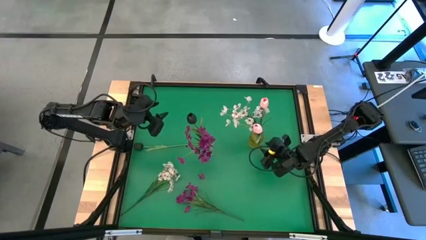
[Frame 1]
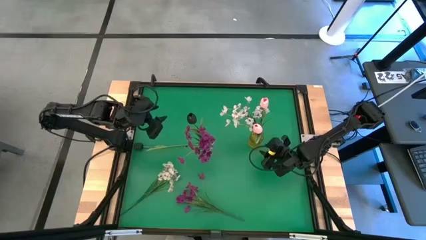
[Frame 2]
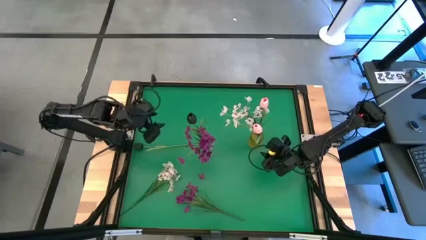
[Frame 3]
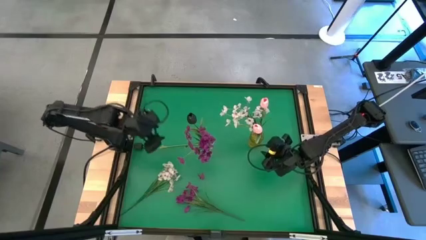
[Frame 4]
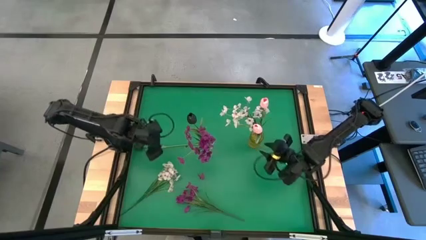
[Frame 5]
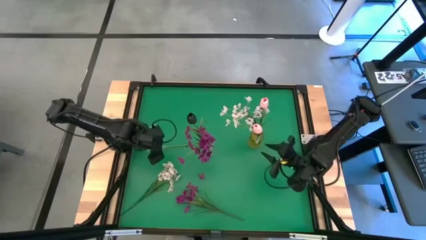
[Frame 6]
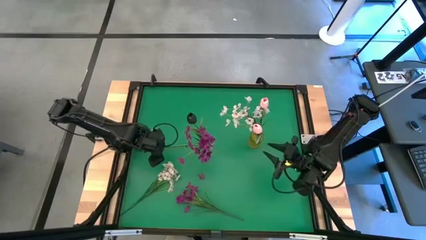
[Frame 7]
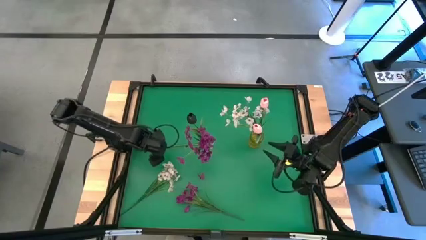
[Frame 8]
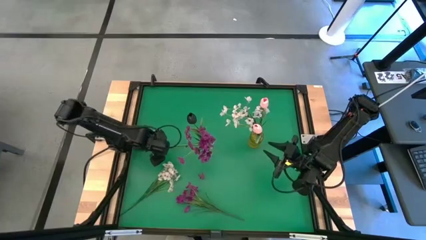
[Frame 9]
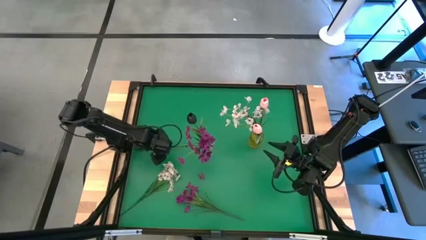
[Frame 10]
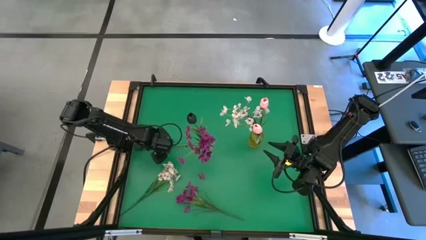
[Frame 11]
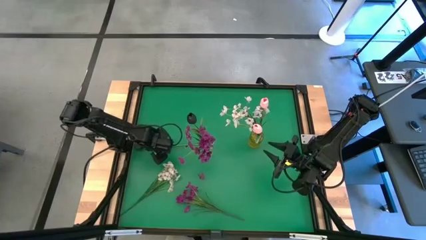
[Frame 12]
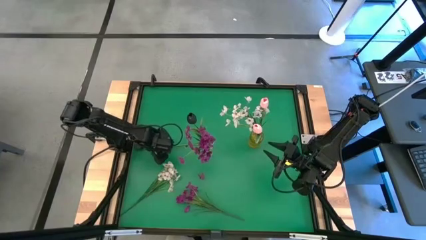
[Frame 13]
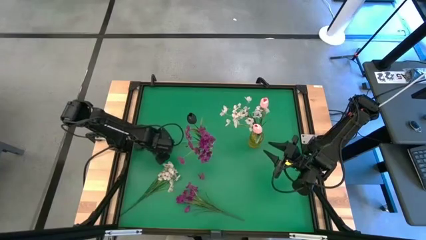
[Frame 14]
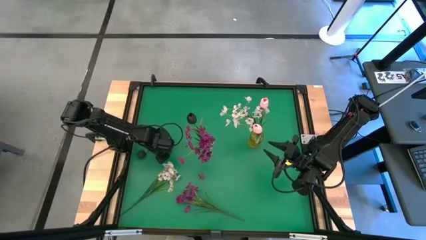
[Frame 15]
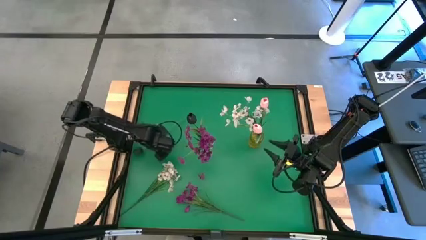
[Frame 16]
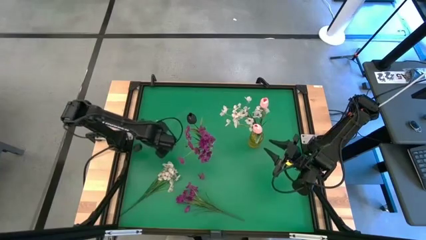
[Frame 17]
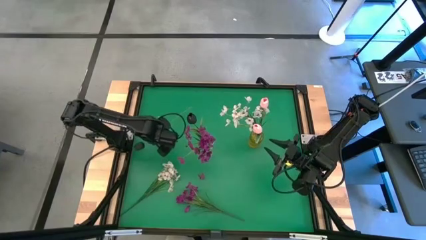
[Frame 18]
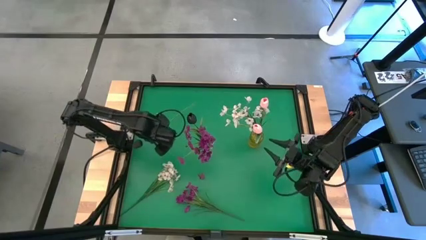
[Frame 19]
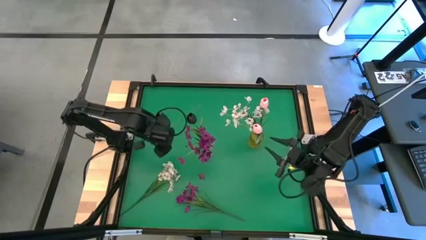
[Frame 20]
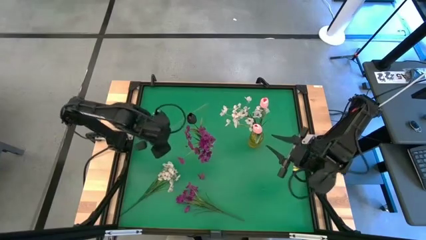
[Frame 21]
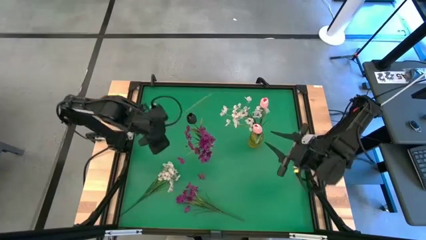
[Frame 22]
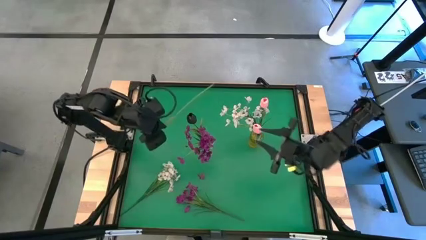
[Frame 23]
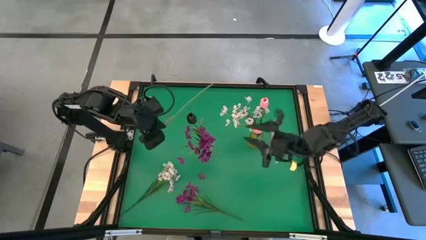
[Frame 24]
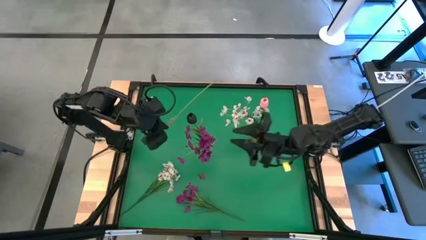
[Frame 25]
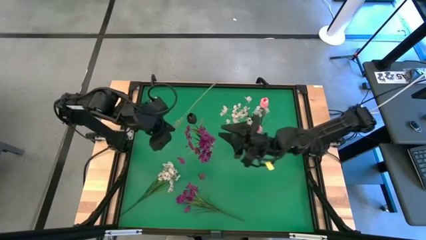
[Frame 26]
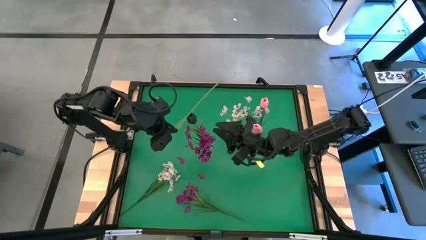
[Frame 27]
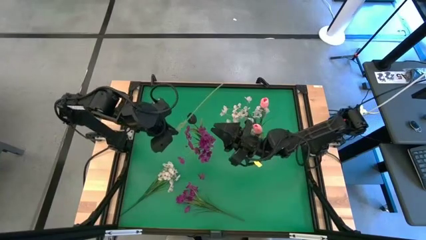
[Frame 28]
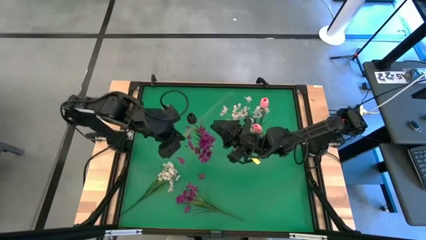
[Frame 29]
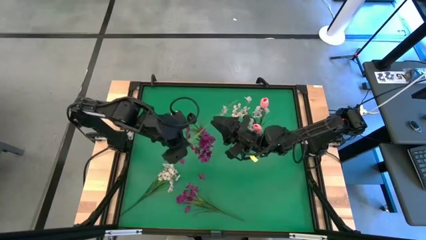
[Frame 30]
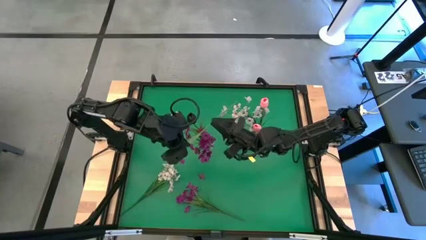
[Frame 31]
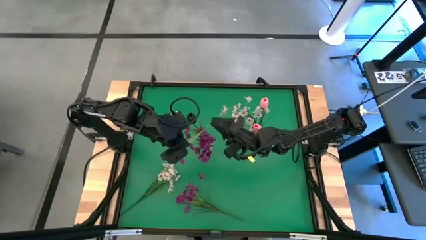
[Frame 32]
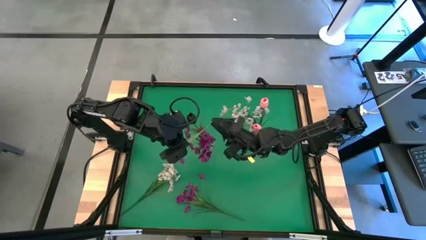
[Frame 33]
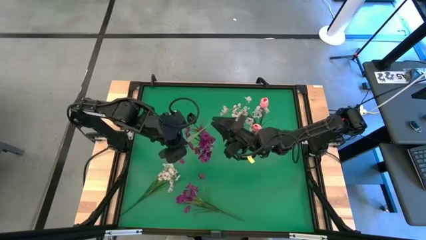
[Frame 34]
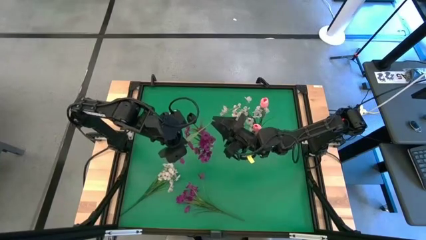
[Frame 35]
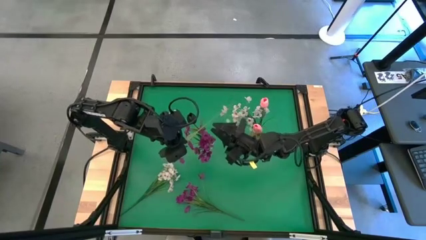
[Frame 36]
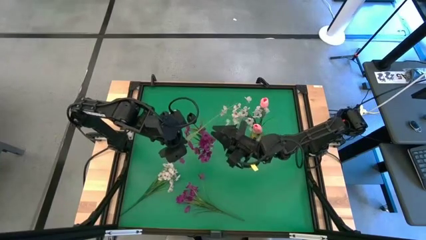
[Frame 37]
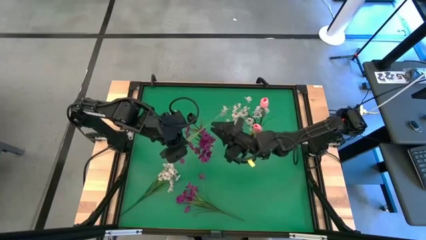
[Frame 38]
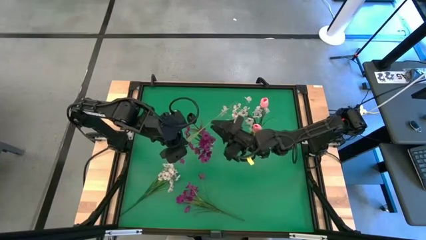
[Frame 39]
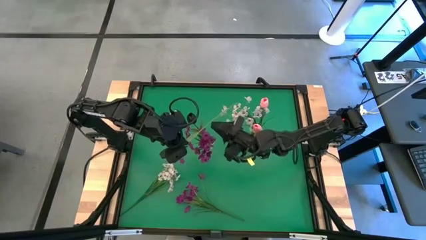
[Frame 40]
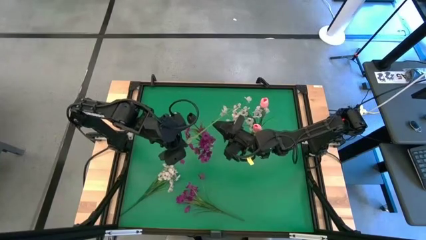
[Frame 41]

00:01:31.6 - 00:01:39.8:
Task: Sort flowers into vase by color
Put the black tulip into the transparent vase

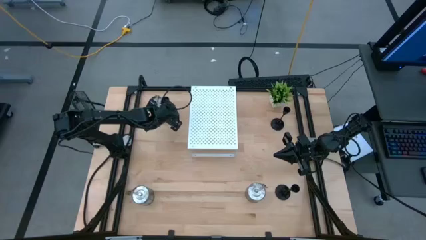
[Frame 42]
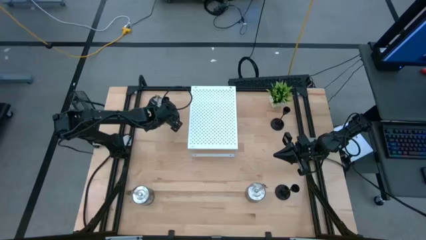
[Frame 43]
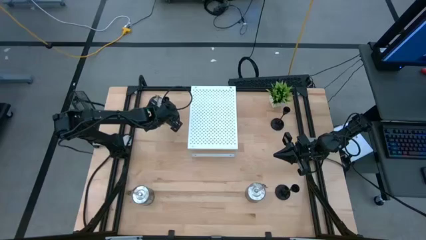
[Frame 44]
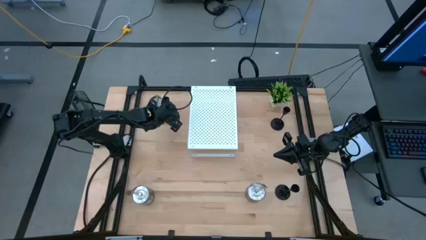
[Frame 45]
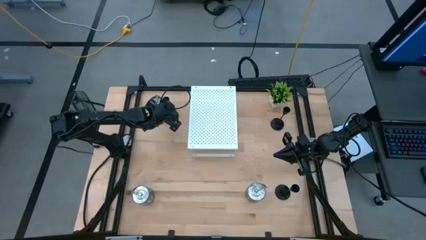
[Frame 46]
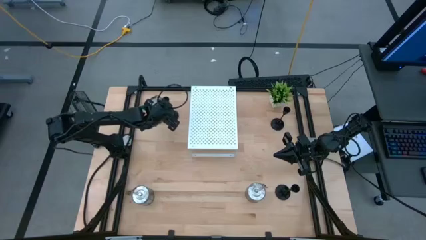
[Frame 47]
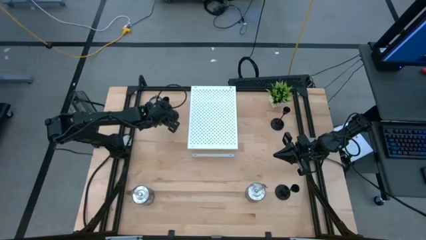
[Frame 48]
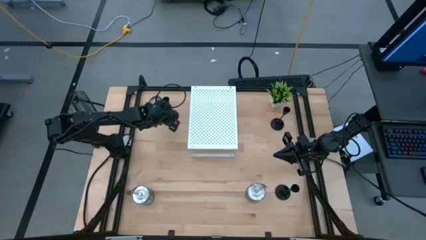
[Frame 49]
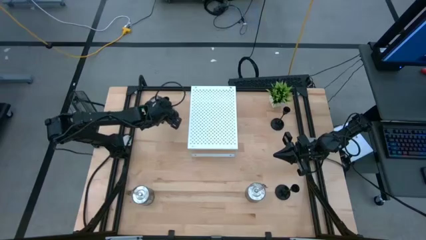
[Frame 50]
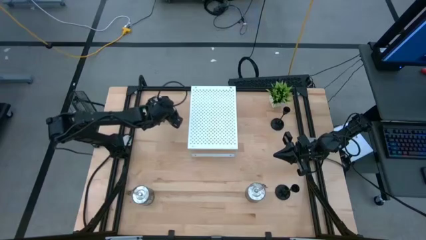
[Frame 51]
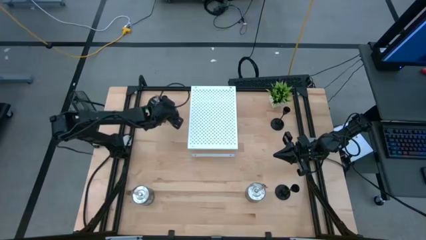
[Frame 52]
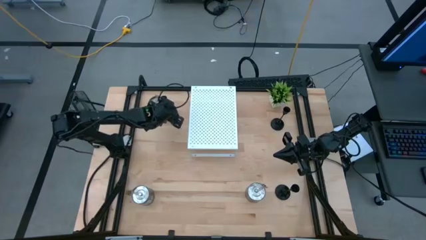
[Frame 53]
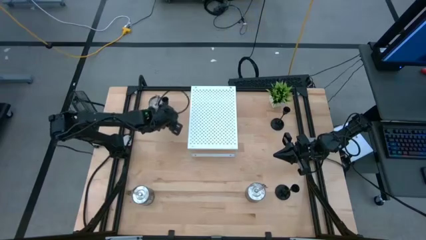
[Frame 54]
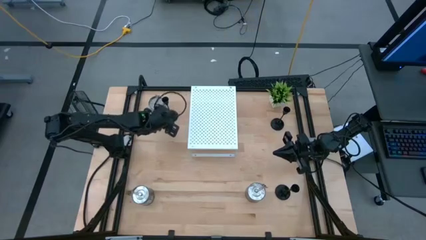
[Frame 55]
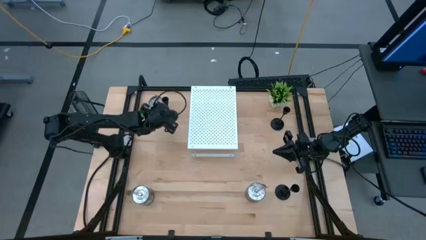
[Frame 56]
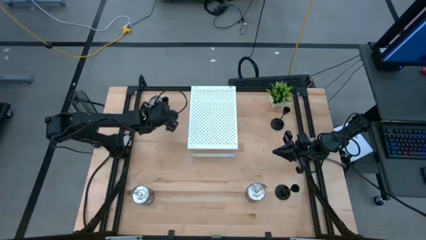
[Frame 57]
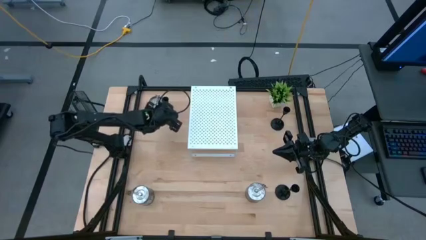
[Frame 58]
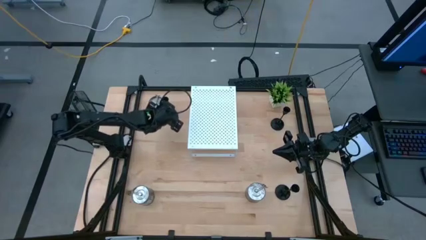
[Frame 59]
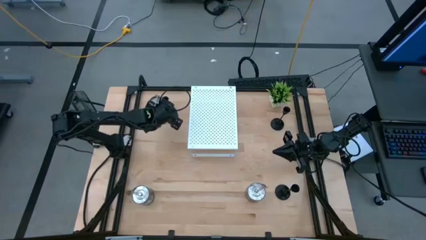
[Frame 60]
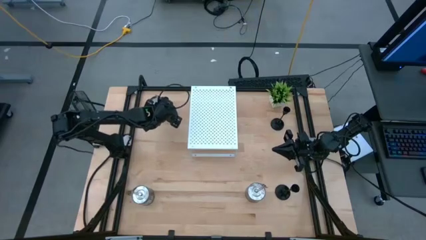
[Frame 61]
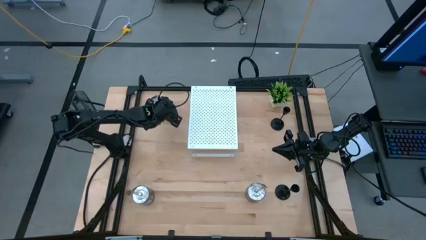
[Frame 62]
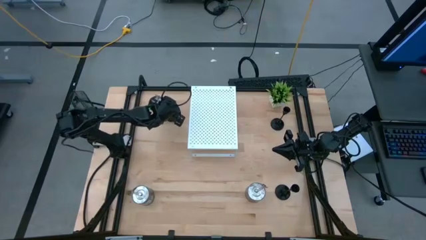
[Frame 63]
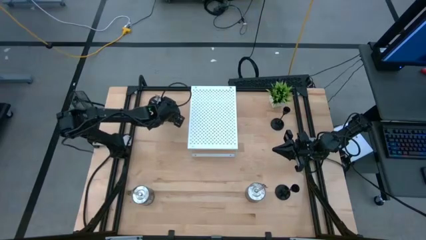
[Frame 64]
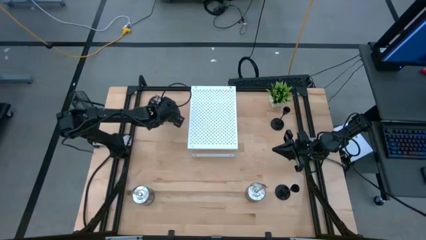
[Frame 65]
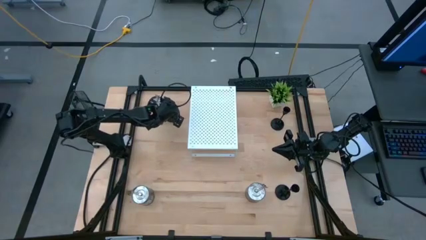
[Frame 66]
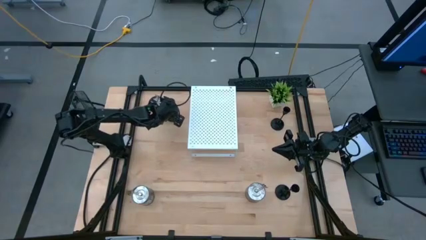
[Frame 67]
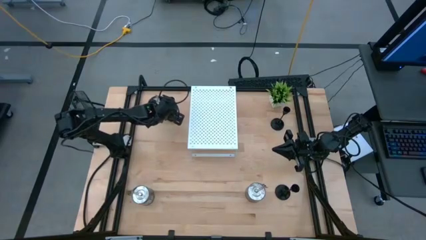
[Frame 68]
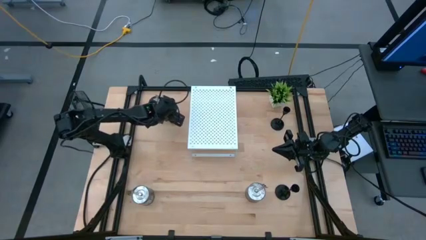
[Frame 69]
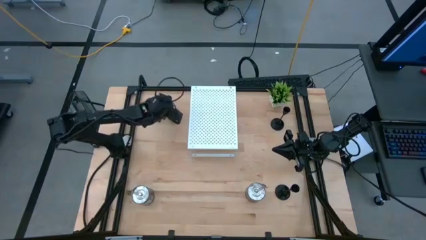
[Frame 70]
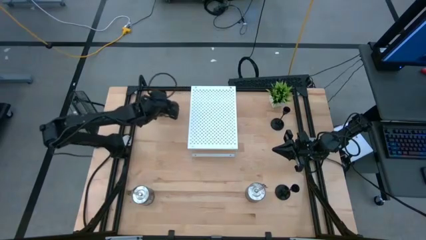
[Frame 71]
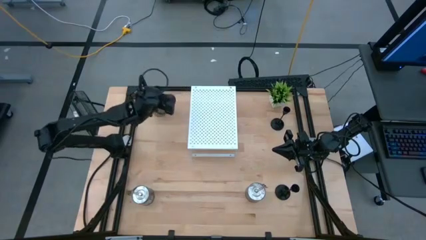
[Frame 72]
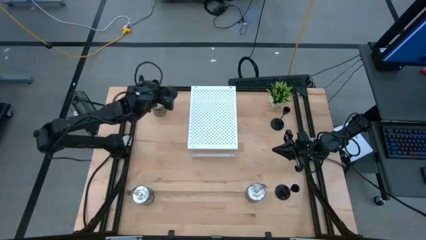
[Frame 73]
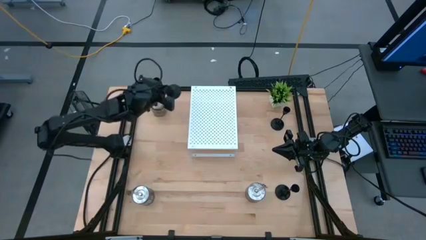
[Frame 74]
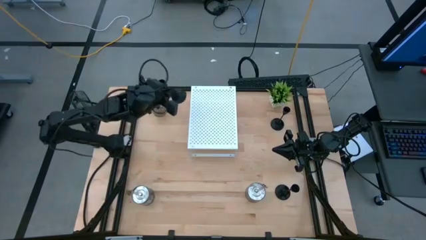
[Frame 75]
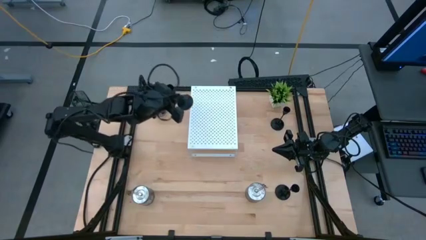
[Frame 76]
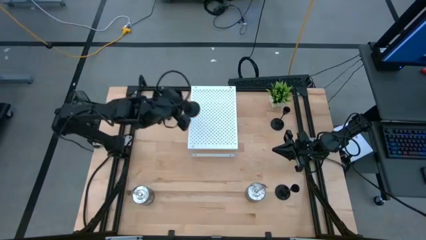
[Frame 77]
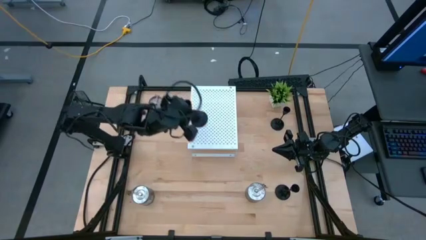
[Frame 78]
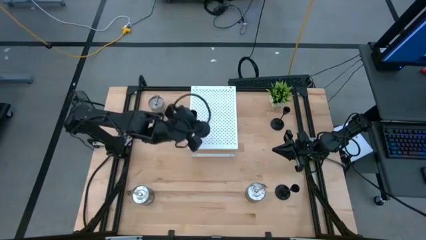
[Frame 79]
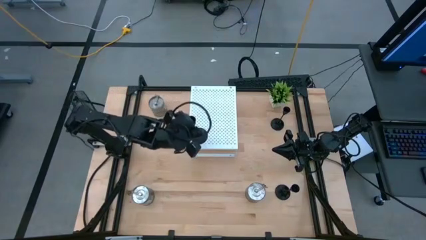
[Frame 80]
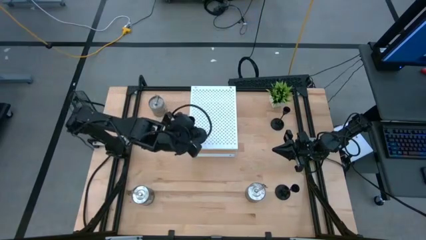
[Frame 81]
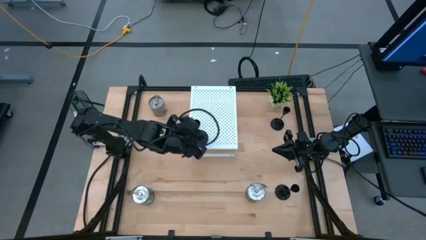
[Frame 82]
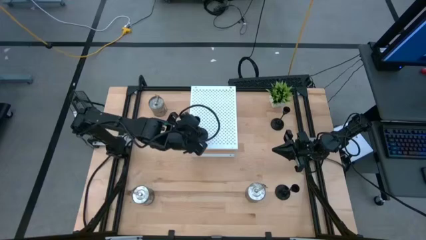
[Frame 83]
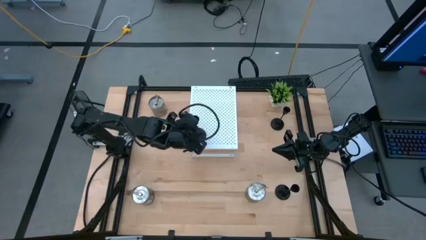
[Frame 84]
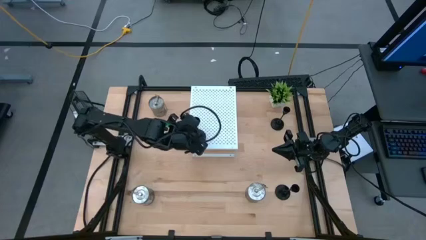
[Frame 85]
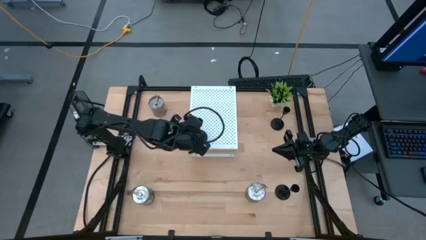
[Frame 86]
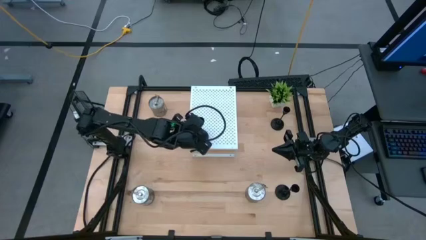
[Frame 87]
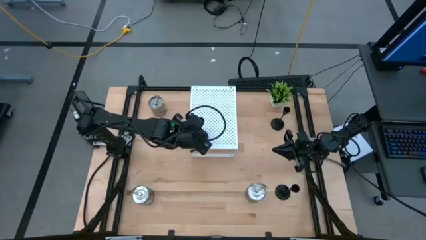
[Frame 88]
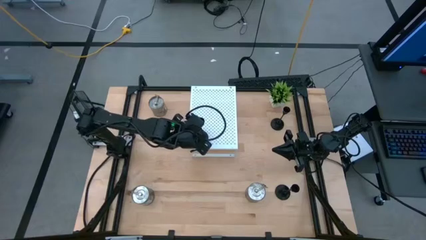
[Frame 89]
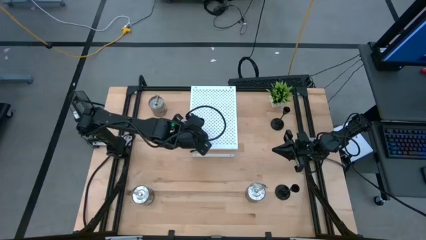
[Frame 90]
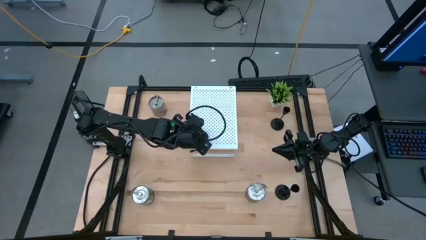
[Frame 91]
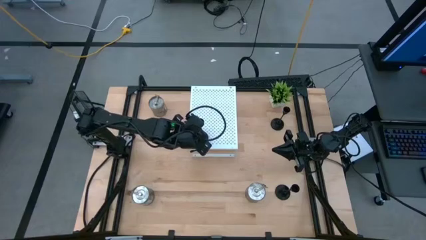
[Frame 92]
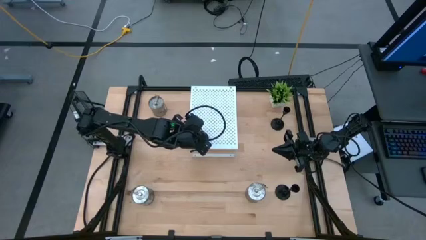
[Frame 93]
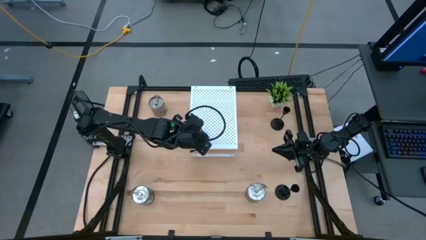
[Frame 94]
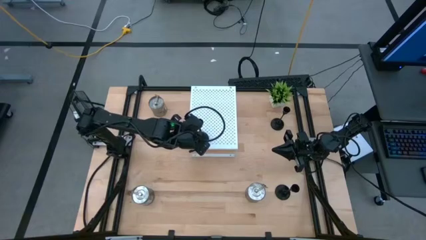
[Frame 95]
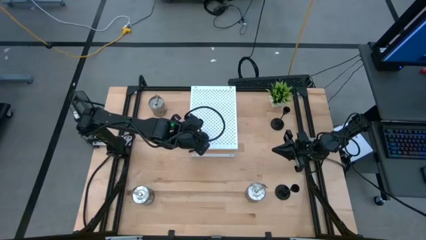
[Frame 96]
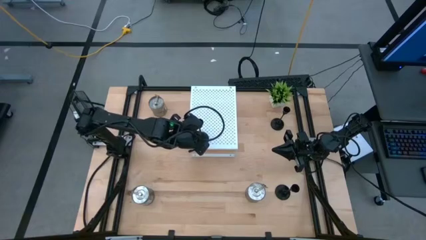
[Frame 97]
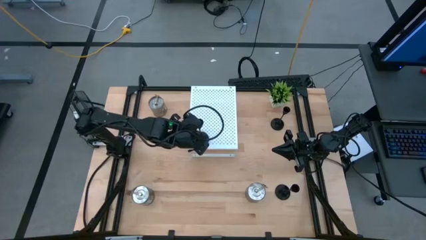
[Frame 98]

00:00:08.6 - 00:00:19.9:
Task: Pick & Place candle stick holders
Put the top left black candle holder on the shelf
